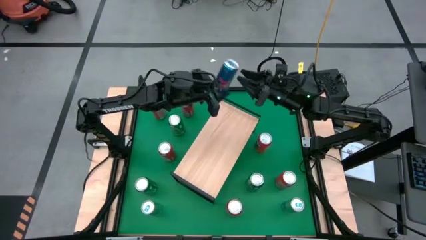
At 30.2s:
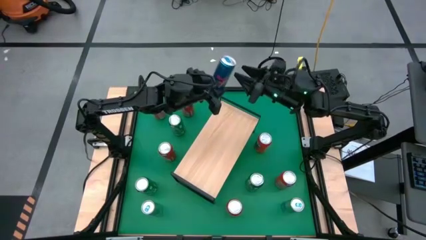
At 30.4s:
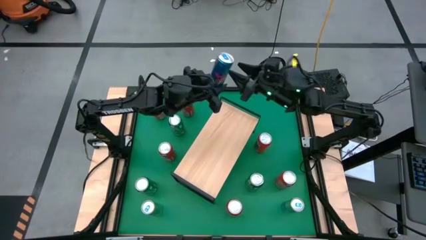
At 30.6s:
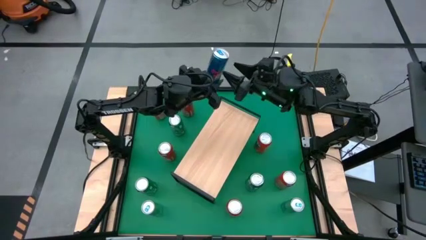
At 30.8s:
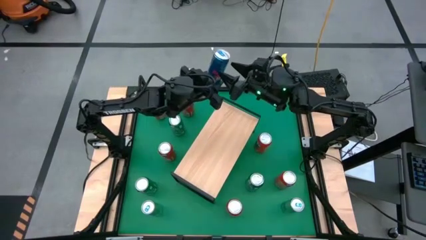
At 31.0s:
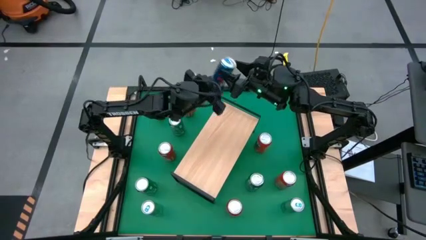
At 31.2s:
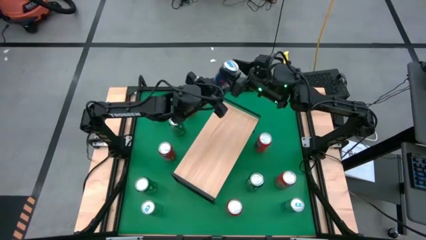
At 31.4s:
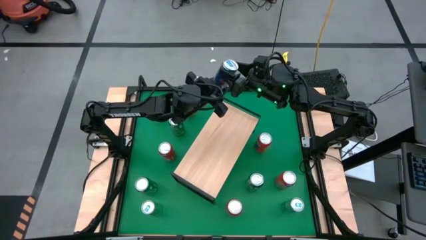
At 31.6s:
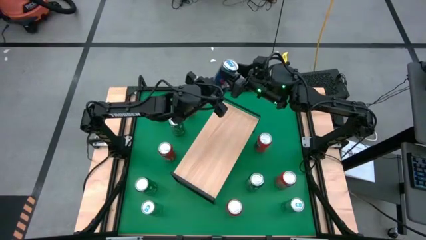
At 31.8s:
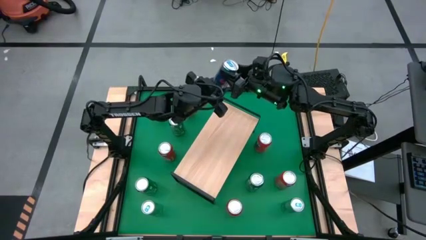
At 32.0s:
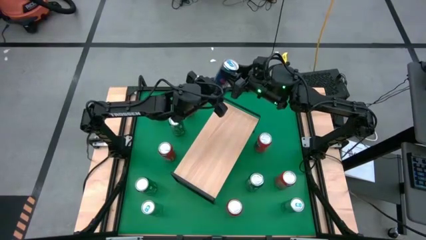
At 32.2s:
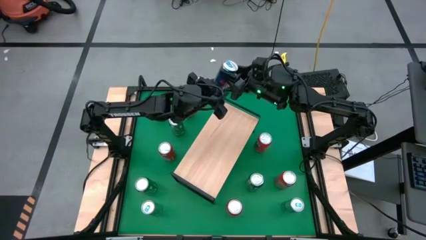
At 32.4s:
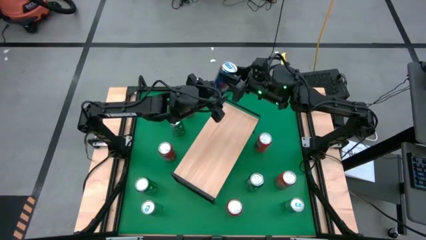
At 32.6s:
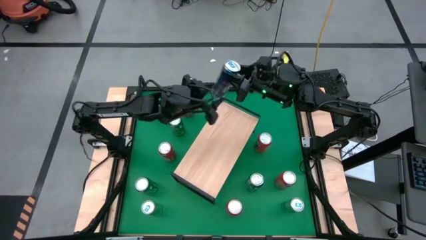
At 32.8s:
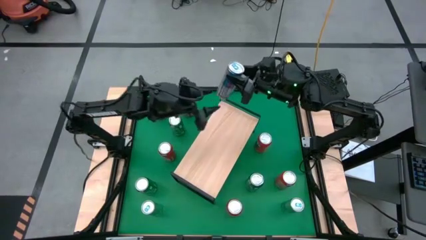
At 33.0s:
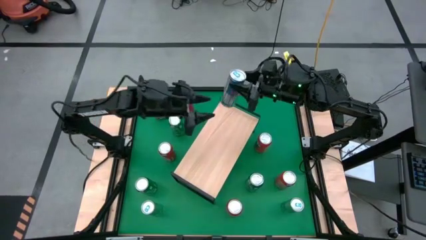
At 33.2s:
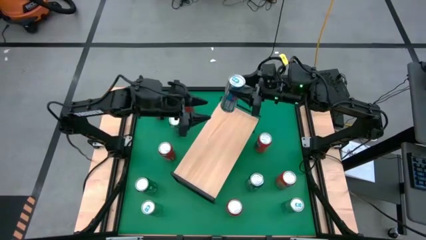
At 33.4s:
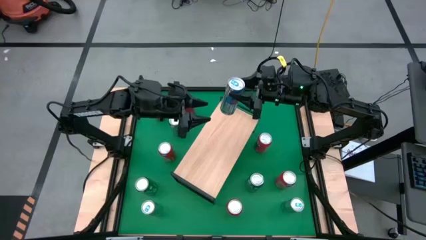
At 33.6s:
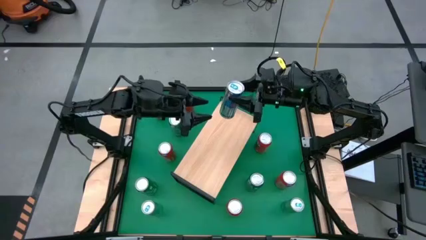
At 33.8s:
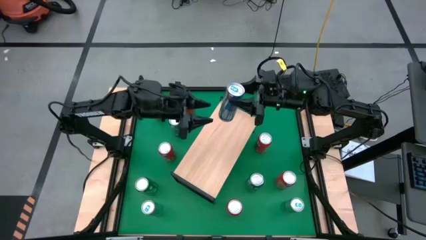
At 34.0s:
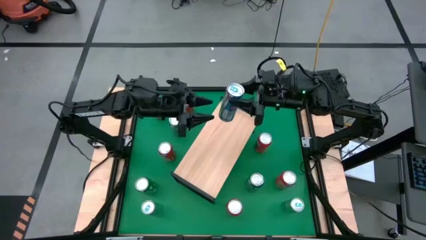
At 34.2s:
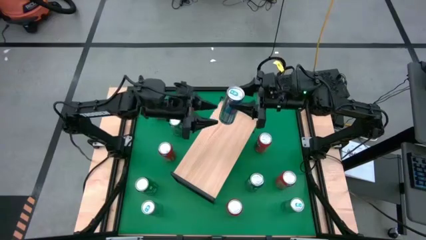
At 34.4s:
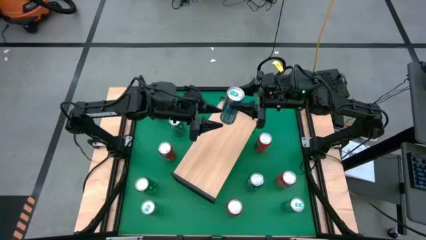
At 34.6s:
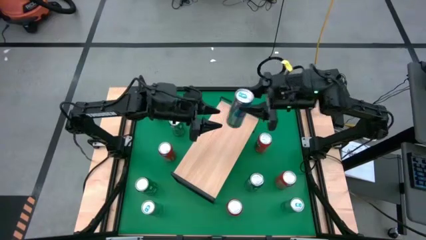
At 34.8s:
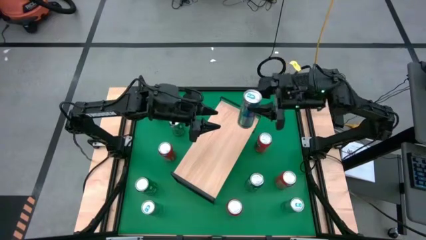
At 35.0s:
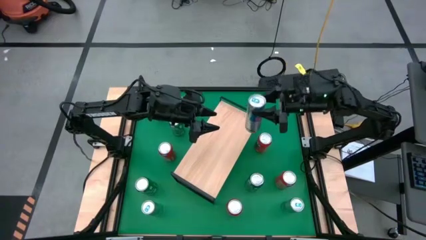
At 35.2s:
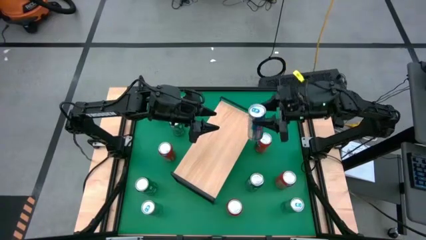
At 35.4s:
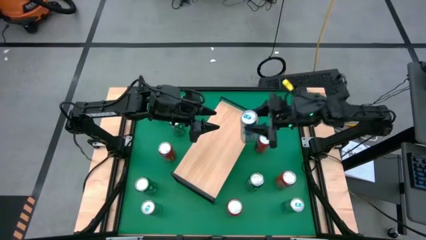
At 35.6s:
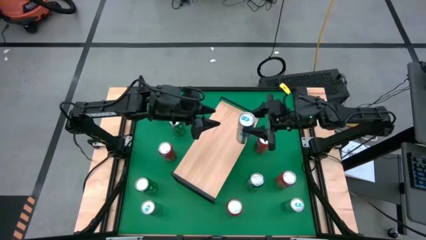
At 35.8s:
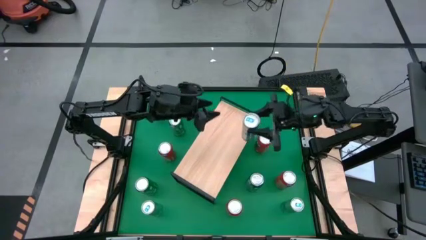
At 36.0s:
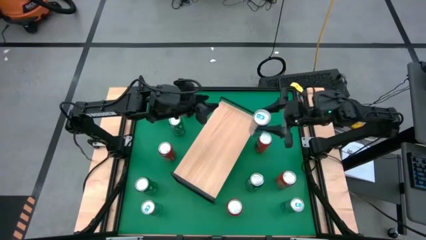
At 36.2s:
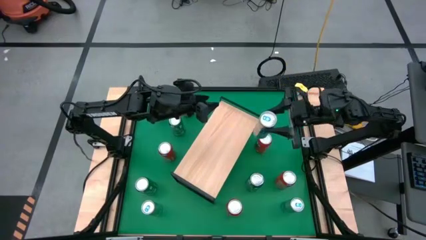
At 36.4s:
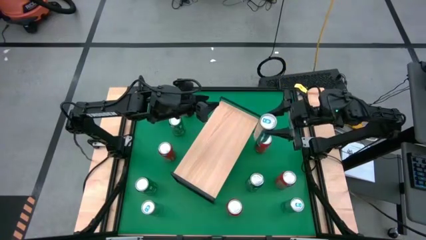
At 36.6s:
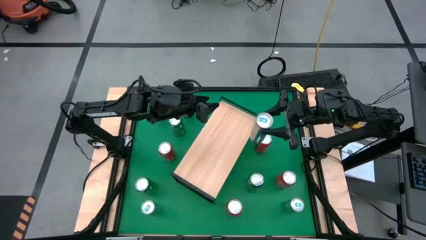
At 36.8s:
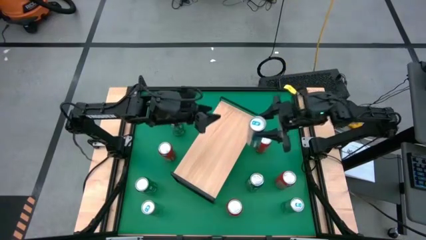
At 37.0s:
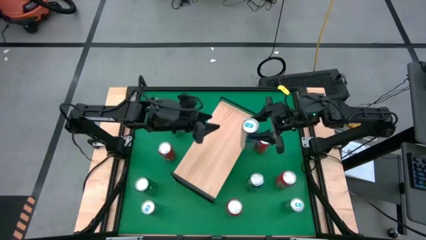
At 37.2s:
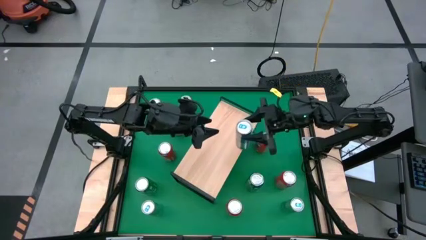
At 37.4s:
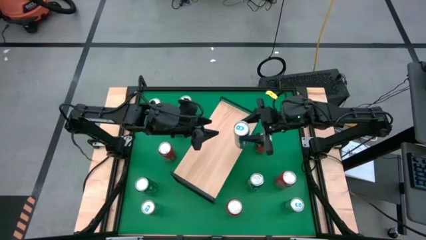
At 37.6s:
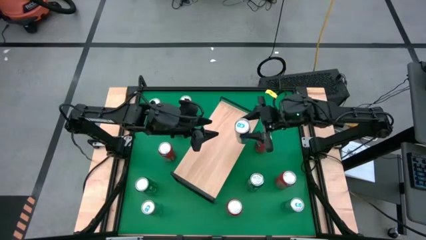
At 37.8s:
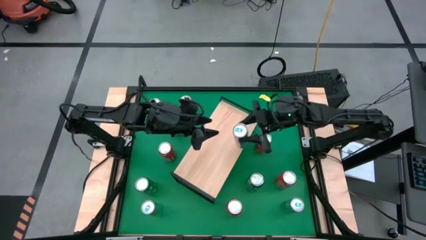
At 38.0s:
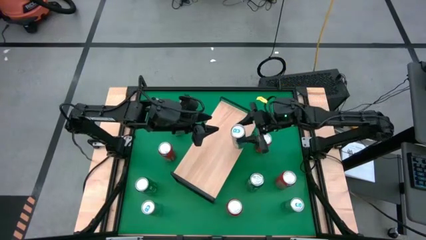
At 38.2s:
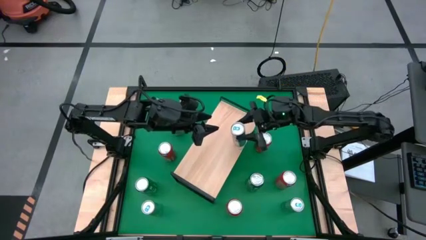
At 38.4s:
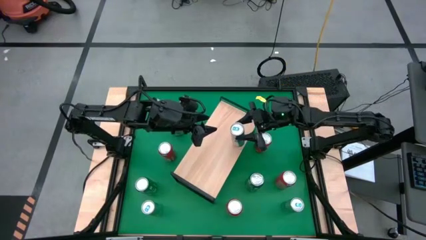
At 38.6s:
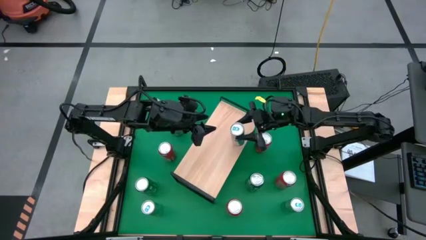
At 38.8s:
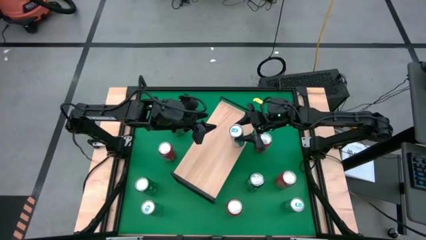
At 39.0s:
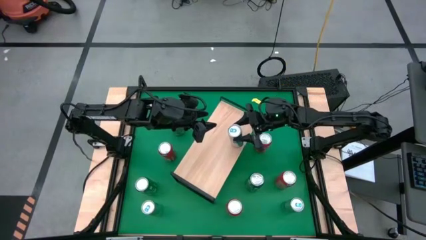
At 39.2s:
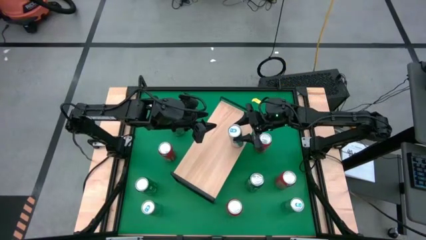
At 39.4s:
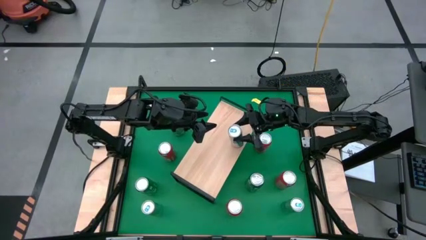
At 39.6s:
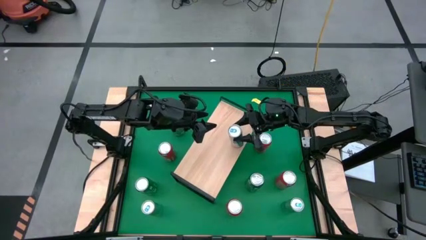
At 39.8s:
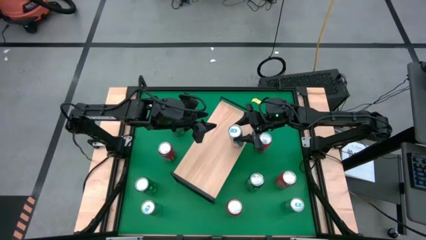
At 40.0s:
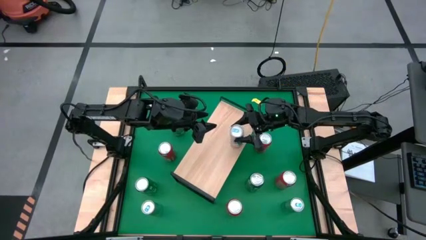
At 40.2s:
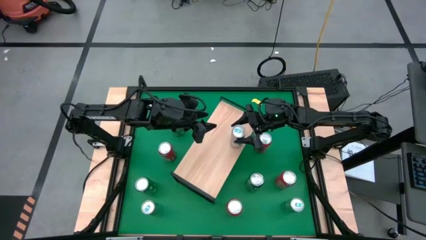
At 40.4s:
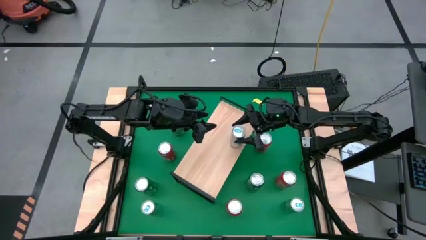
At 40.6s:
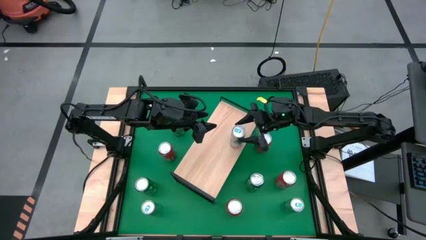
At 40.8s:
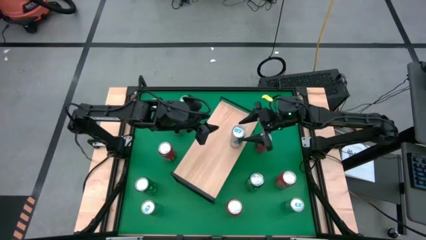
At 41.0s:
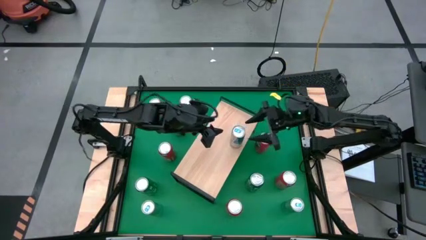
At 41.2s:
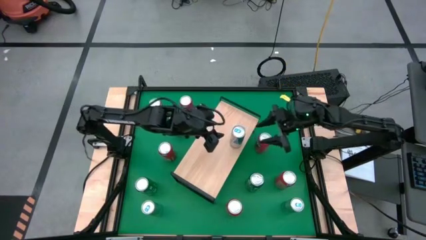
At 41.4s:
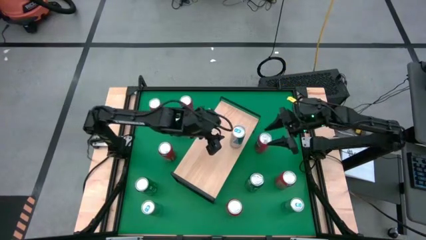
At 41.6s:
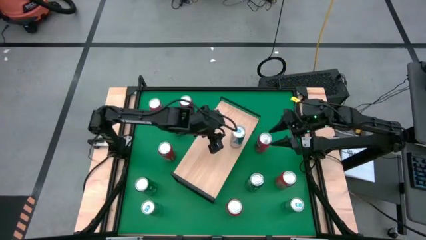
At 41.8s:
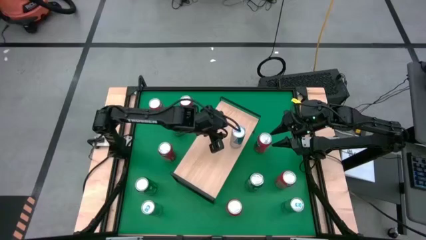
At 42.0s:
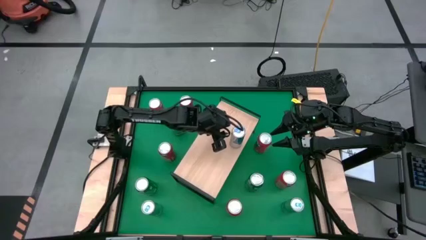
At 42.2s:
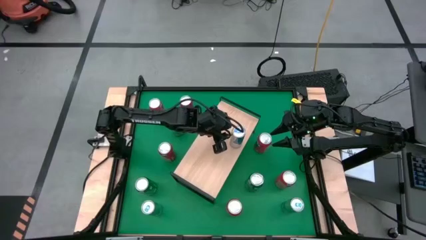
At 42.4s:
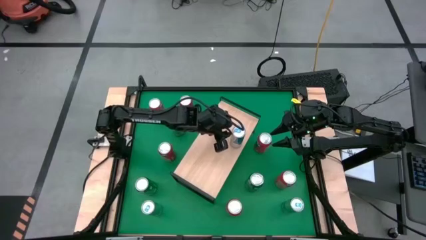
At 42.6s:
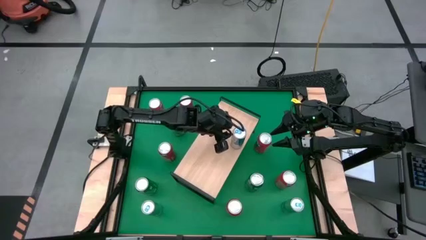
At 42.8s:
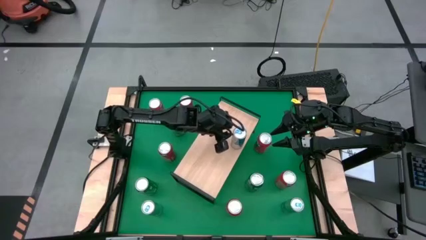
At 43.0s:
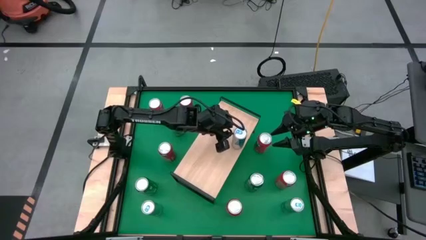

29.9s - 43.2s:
Task: Sort soda cans
Put the blue soda can on the shelf

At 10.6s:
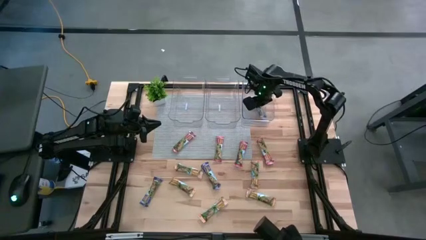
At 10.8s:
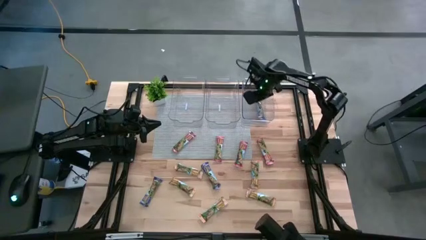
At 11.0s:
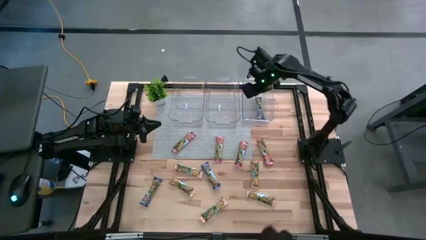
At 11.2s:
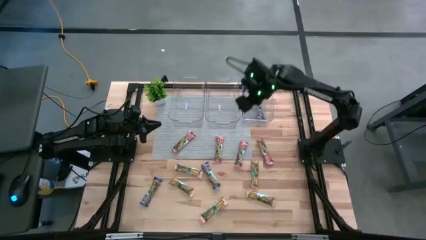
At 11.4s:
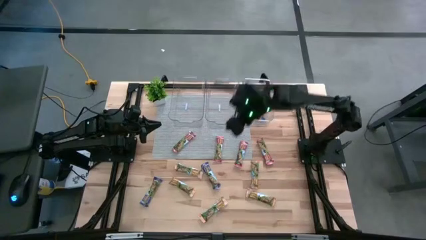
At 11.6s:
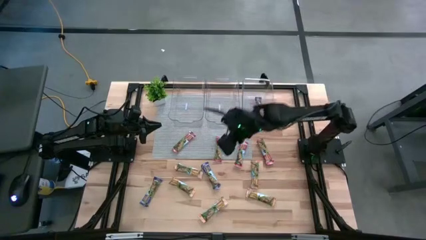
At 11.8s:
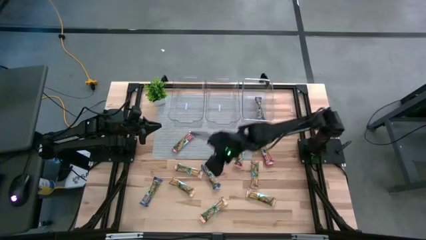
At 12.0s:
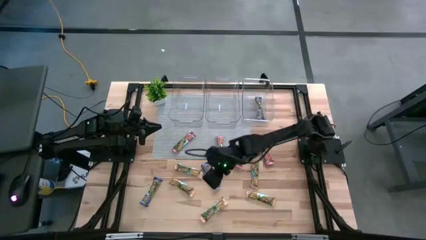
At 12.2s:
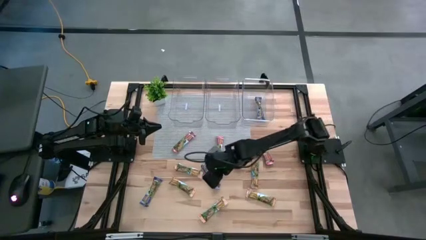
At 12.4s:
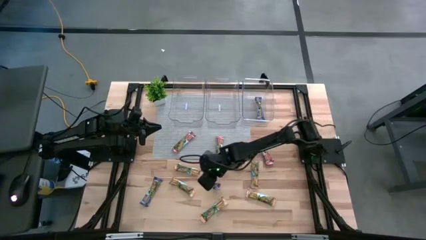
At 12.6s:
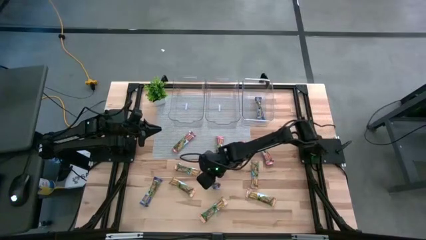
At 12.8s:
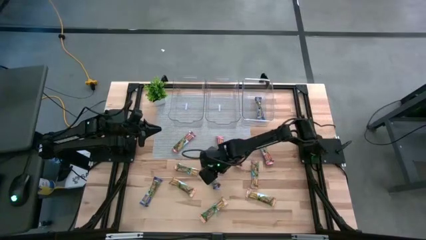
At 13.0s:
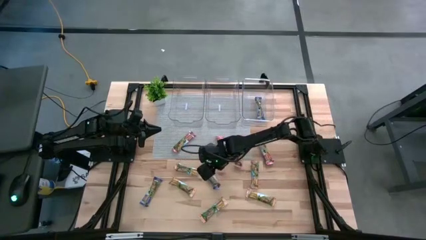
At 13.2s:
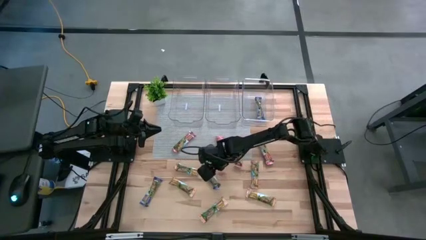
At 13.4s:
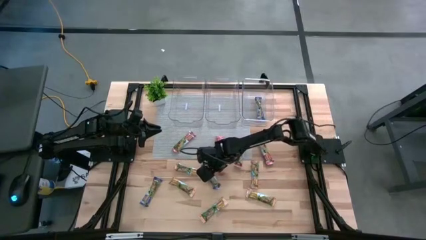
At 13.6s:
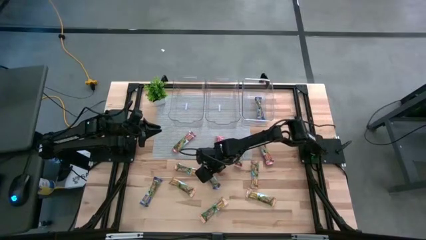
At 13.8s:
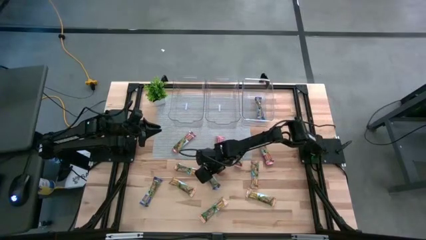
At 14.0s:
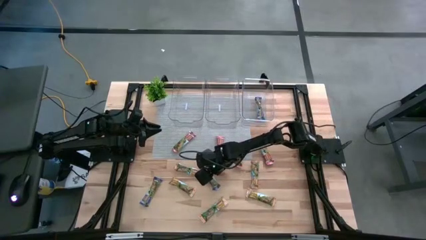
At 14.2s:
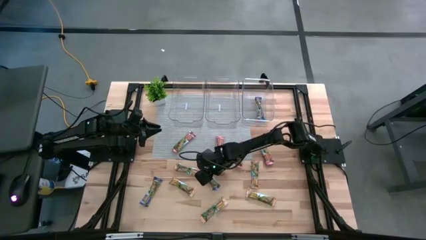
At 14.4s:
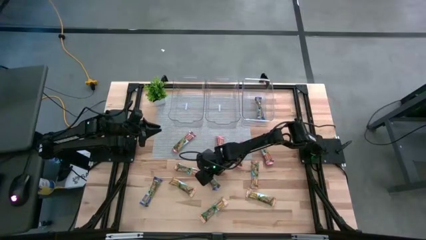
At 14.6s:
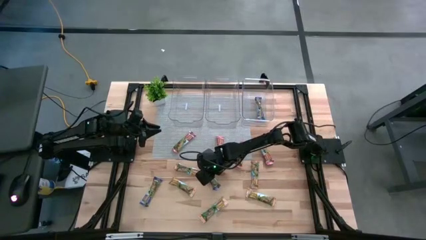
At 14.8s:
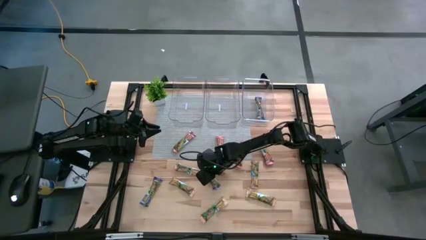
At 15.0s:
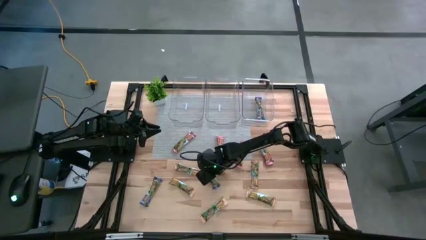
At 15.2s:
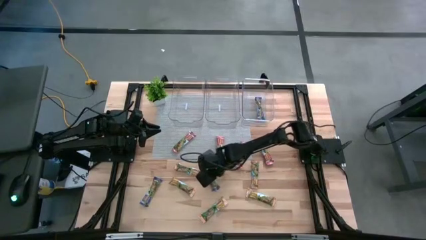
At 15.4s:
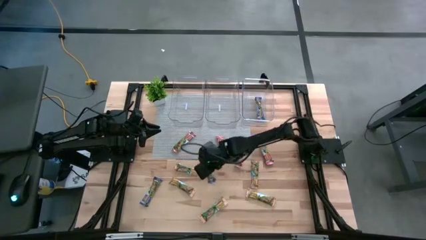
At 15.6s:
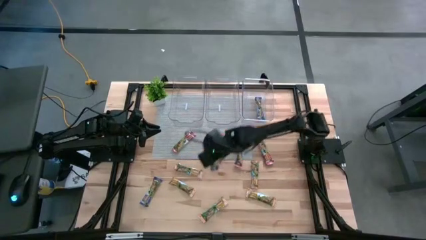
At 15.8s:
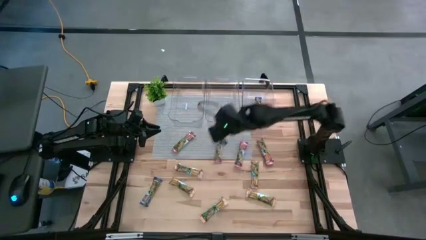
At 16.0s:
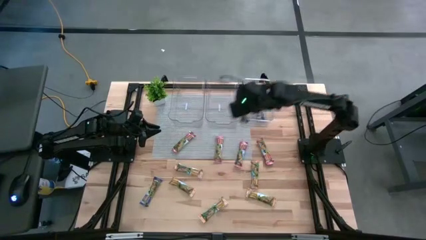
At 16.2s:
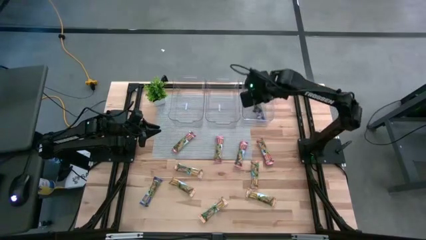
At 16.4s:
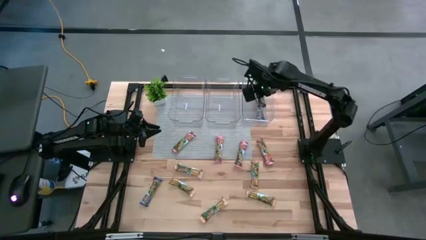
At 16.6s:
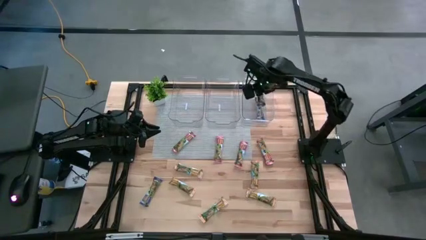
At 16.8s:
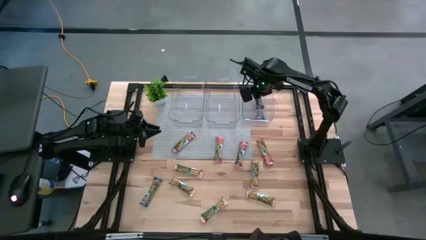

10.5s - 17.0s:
Task: Pick and place Granola Bars by type
Put the blue granola bar into the right transparent bin
